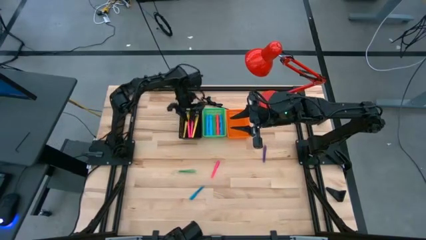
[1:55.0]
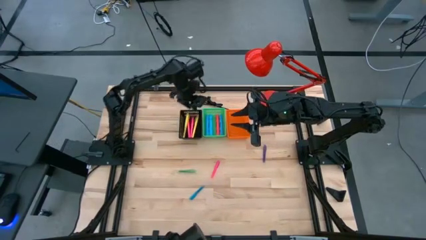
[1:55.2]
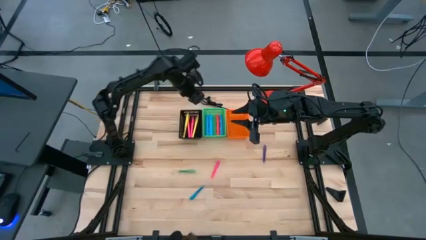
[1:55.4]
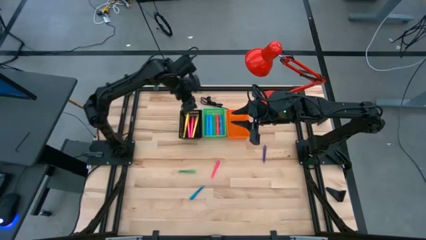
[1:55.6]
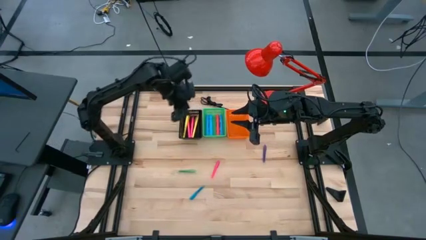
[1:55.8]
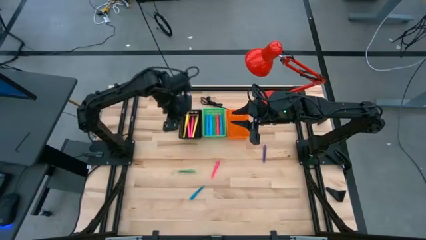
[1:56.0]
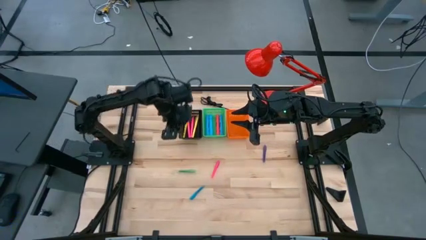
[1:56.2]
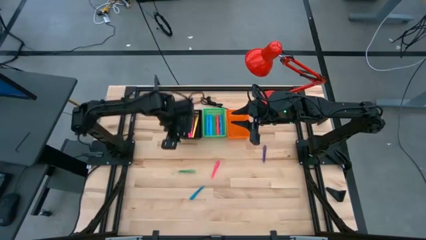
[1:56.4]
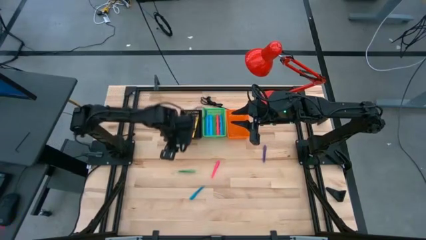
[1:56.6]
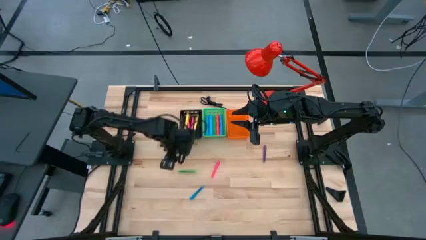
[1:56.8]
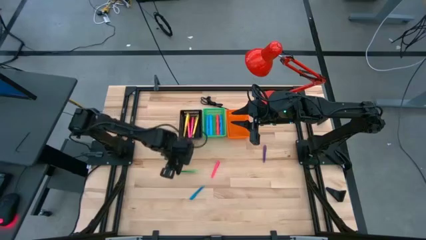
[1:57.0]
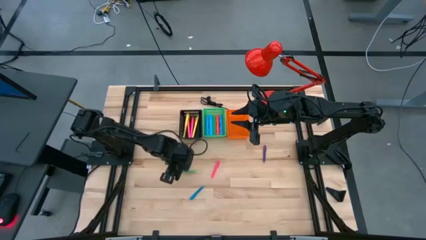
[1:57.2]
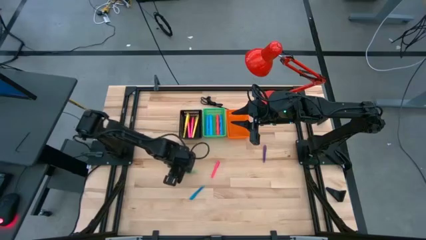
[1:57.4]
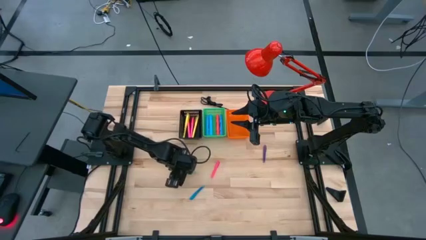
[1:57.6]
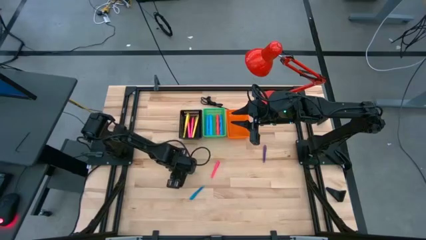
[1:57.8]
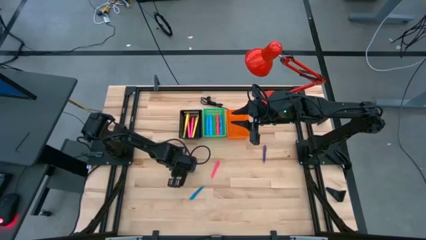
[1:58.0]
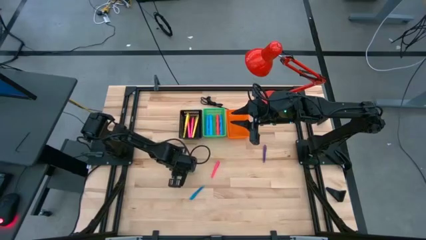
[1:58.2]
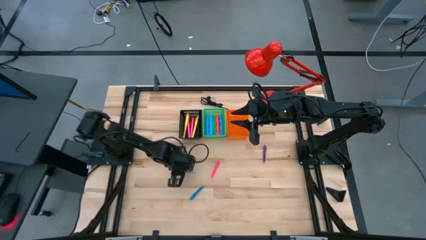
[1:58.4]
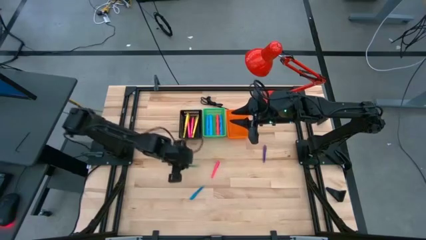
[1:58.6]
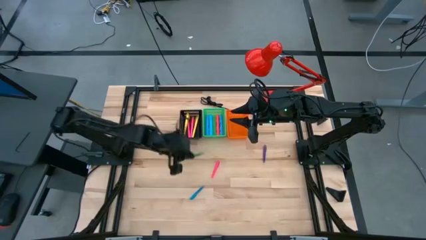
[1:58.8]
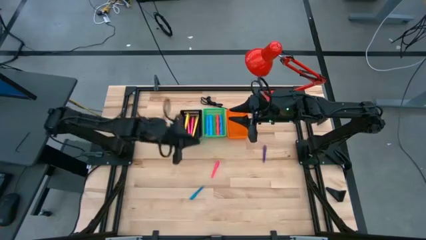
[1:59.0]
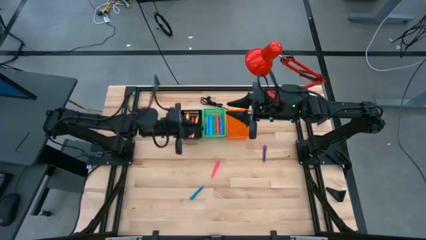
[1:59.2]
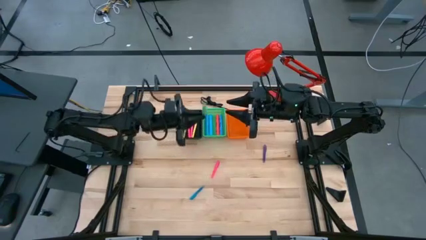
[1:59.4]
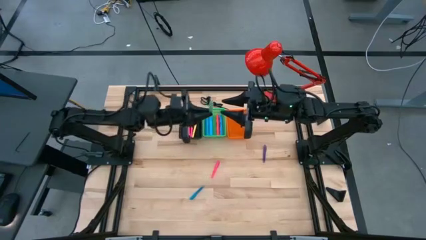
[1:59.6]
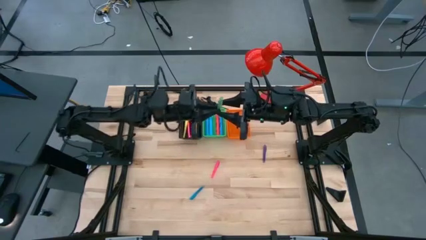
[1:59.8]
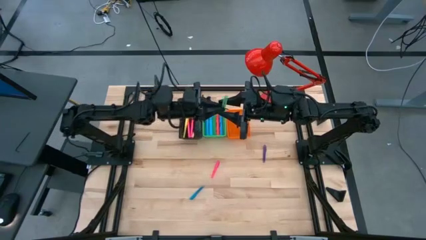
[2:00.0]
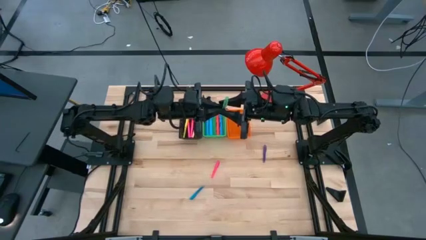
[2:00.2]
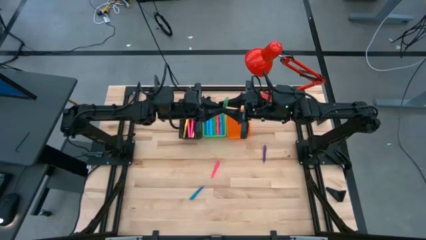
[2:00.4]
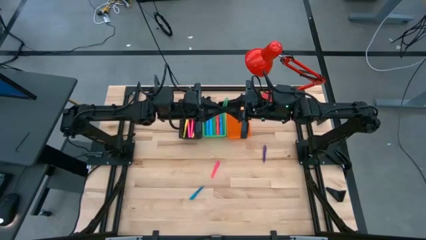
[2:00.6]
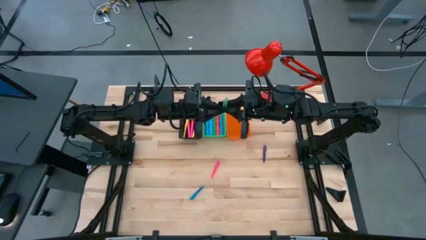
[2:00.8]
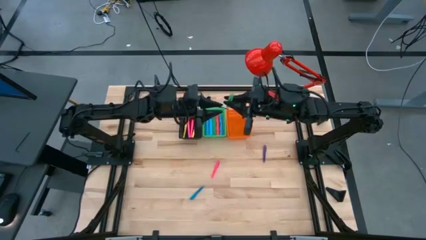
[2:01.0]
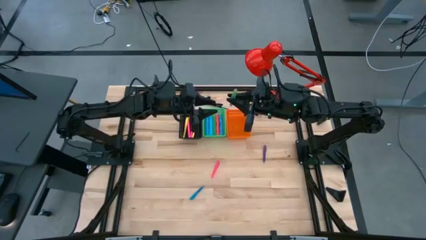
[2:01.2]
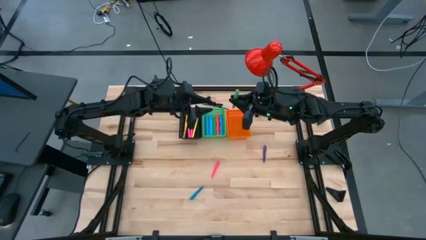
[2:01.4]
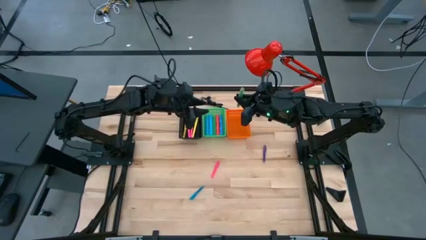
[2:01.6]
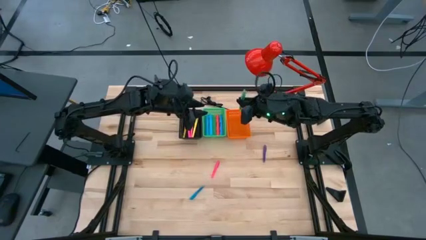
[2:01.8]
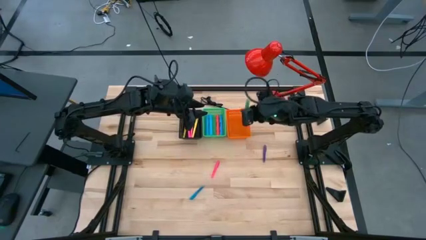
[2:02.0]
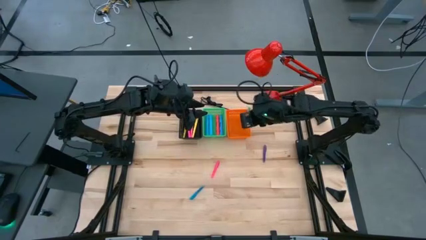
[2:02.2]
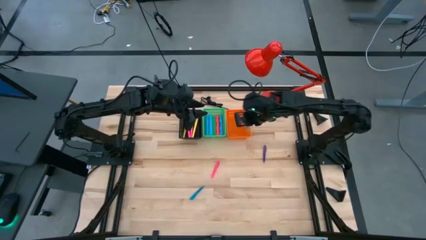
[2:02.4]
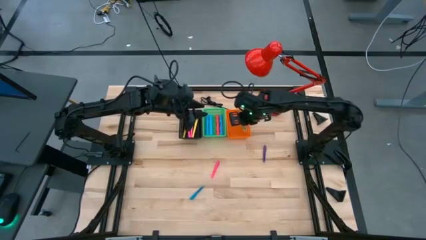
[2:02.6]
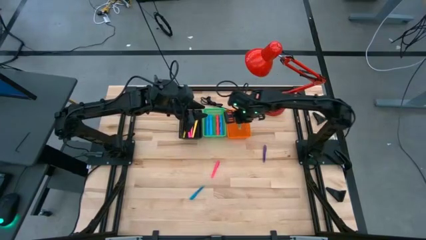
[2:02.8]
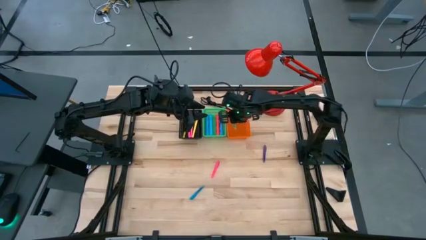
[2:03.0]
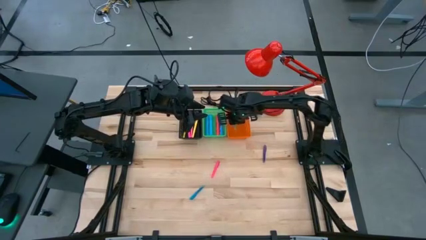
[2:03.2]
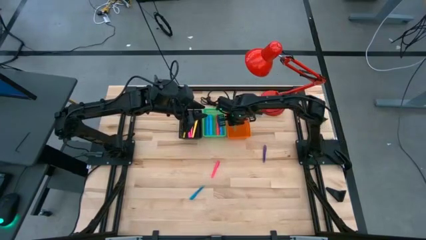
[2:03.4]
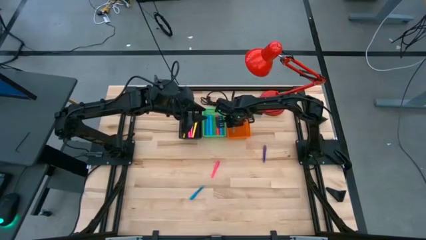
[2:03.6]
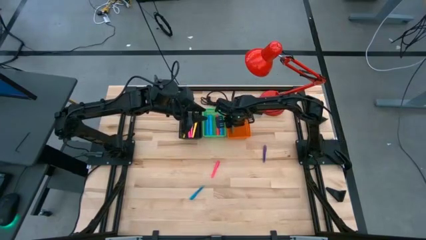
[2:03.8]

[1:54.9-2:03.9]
Task: Pick & Place Markers
Put the small green pen into the orange bin

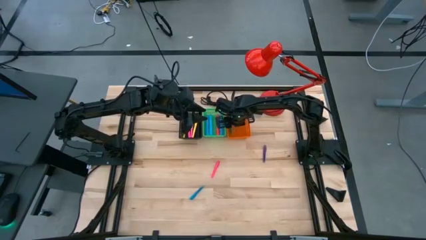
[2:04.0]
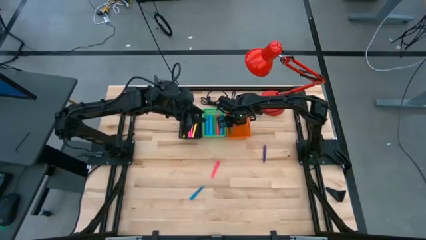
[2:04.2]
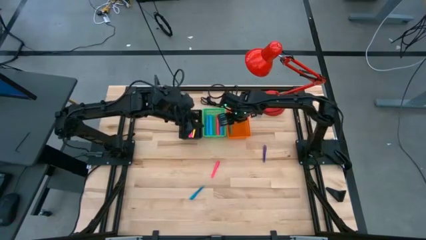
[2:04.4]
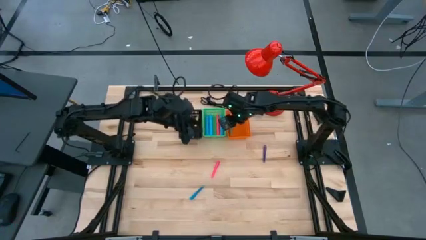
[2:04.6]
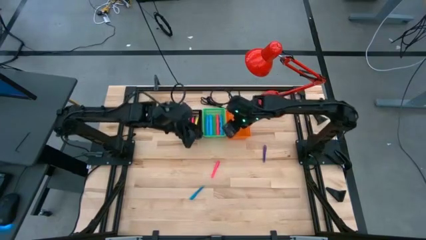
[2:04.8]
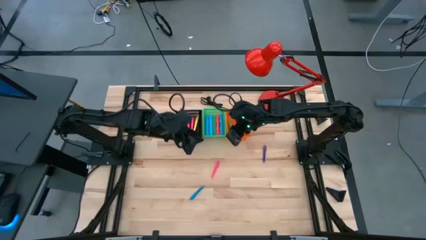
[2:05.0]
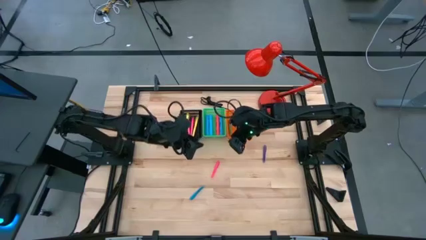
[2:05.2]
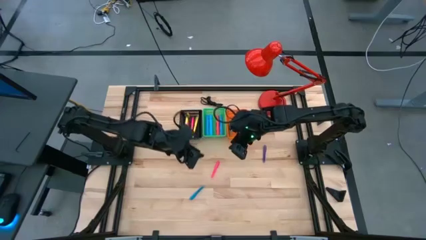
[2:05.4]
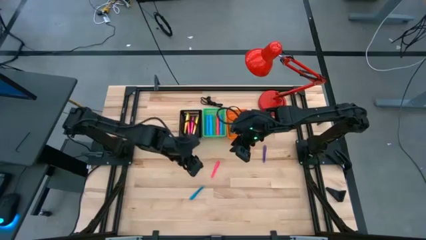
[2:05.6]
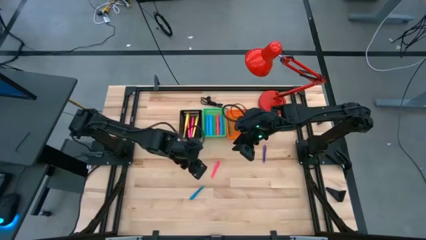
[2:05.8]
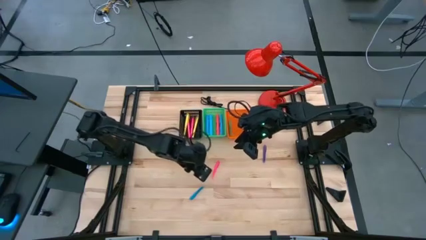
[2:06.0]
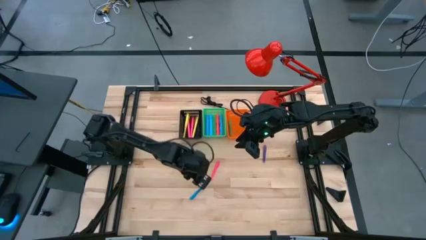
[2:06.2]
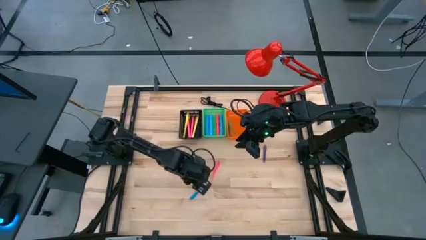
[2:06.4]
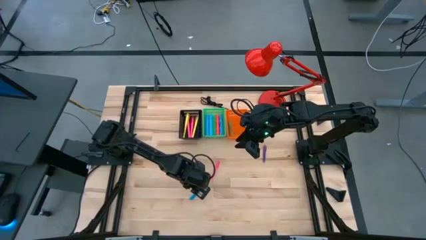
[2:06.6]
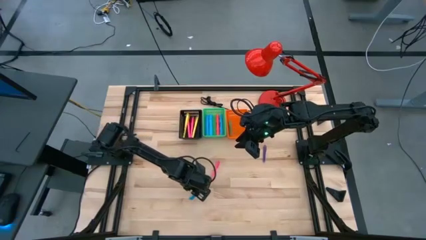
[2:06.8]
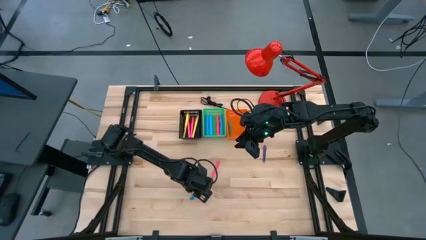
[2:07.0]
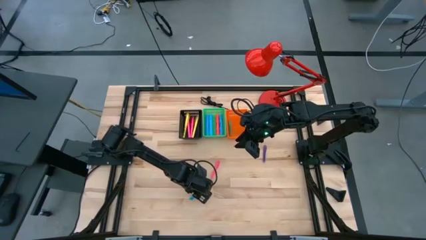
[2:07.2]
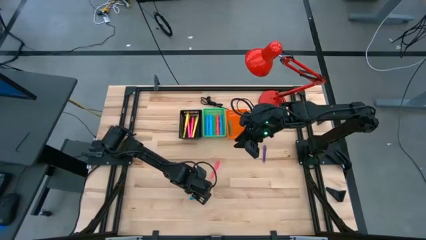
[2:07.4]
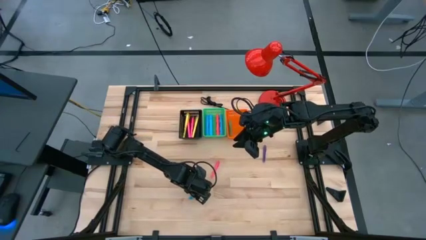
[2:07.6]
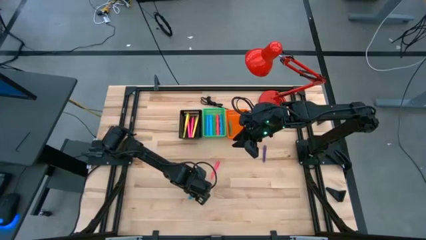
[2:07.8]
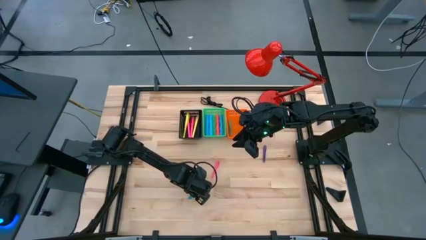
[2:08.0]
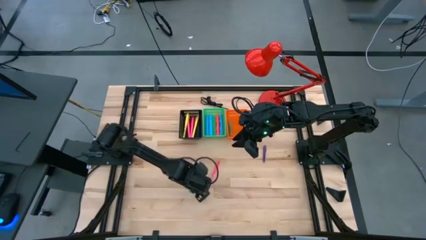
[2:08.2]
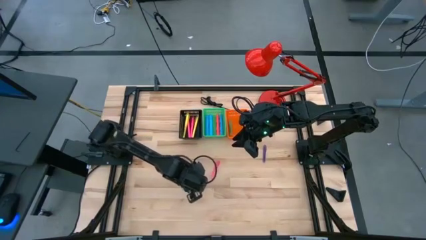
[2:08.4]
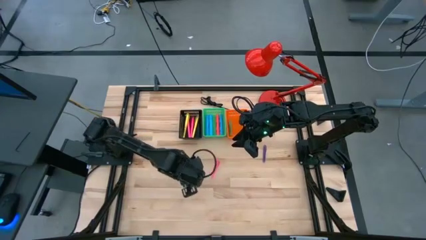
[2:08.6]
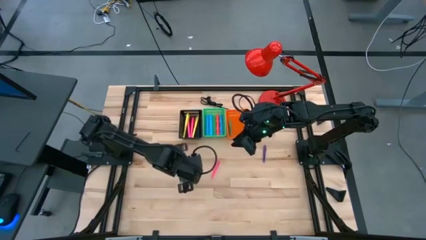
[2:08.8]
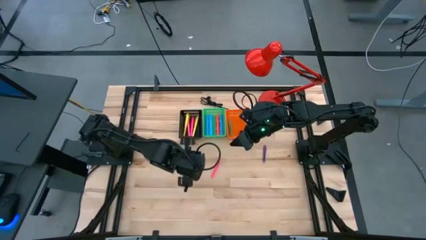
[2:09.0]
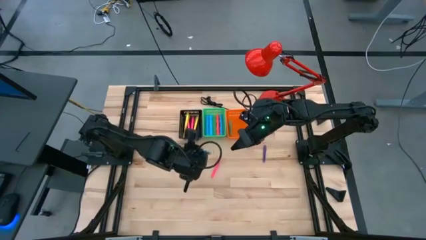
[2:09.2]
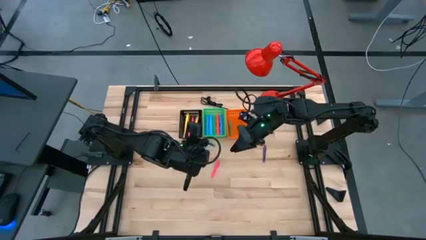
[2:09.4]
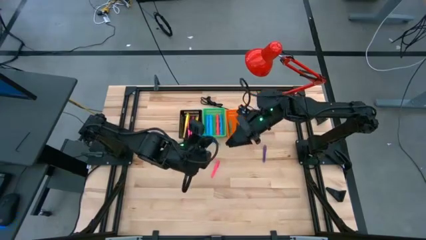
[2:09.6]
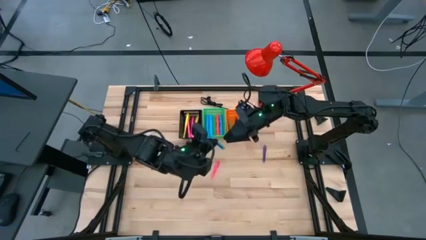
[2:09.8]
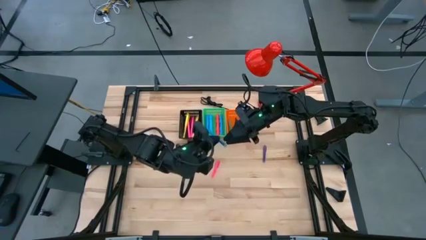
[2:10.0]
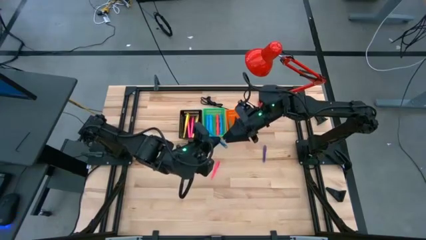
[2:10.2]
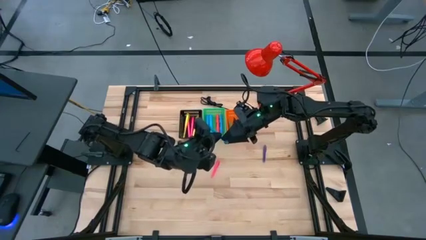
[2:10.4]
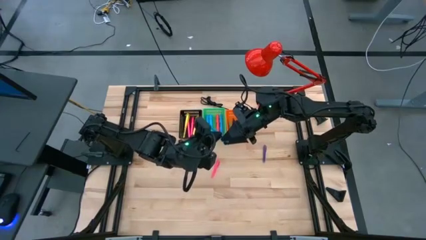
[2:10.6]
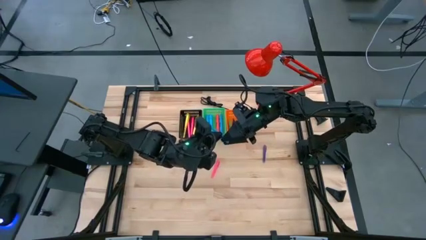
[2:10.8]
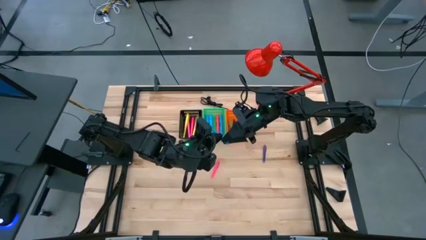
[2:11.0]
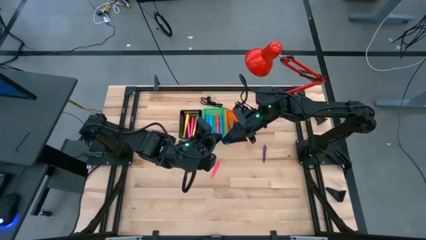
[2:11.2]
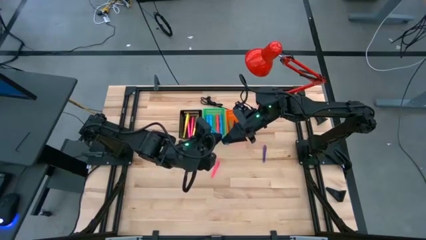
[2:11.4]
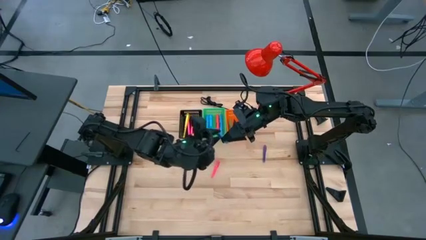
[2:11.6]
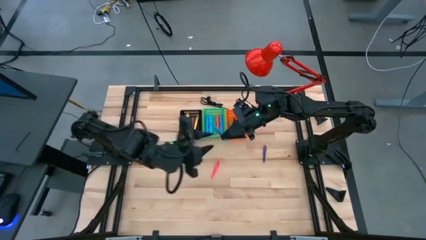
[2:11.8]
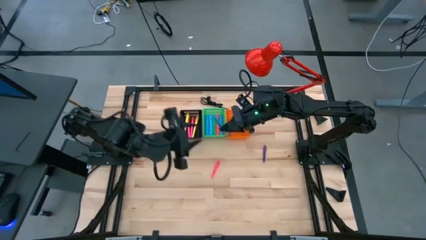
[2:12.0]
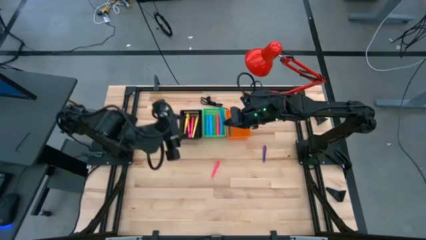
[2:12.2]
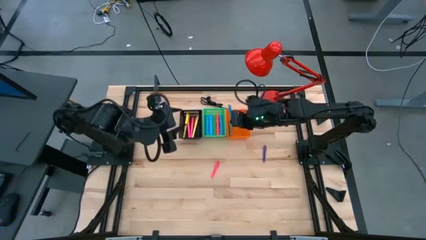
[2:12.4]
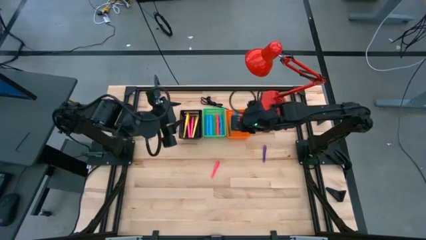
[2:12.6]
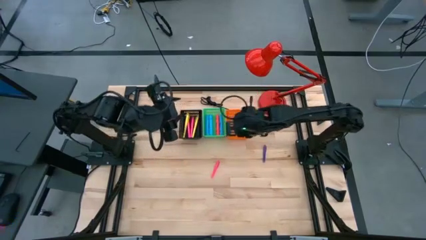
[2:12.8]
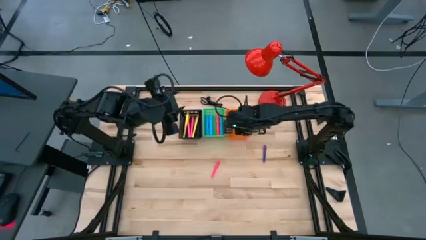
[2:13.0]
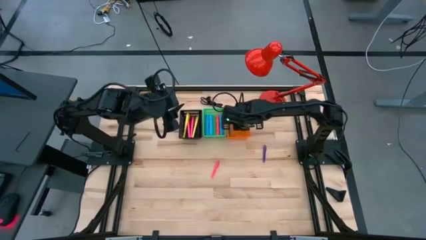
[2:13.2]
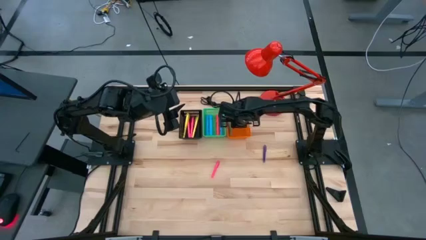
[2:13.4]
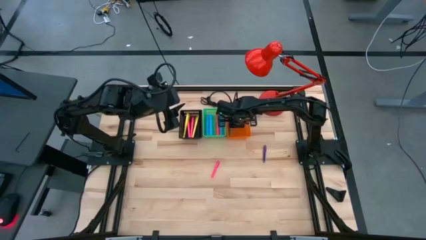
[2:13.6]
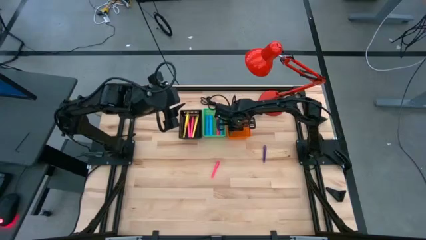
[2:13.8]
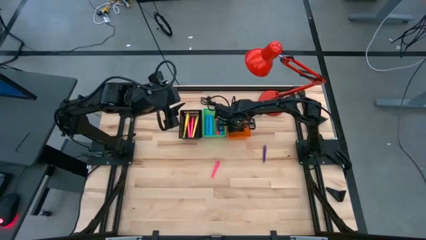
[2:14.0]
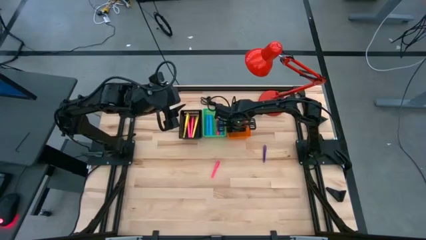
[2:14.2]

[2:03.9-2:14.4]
Put the small blue pen into the orange bin
